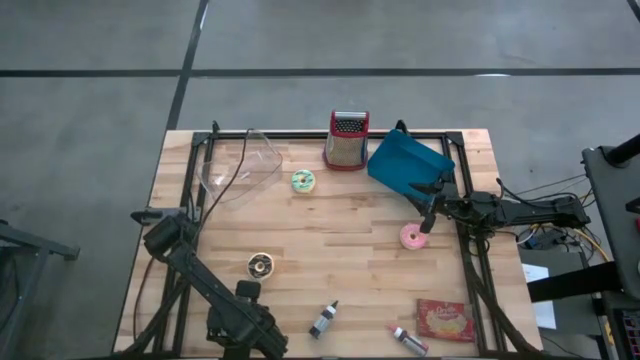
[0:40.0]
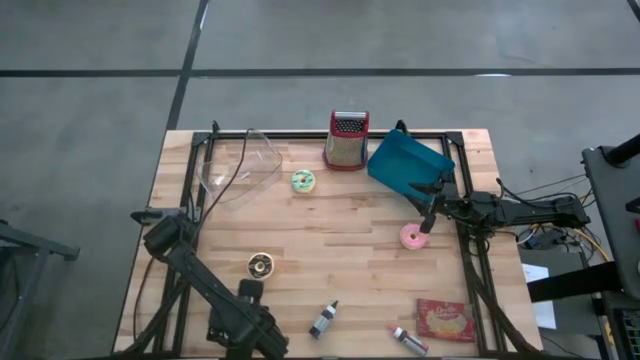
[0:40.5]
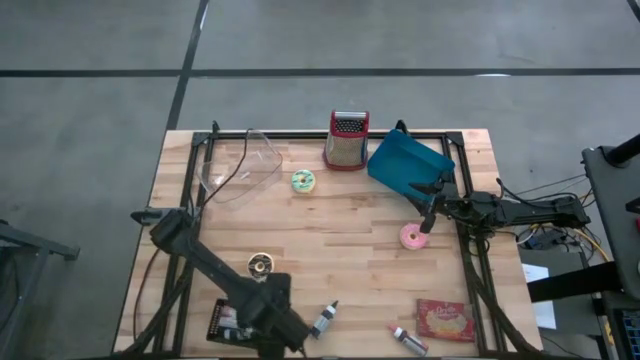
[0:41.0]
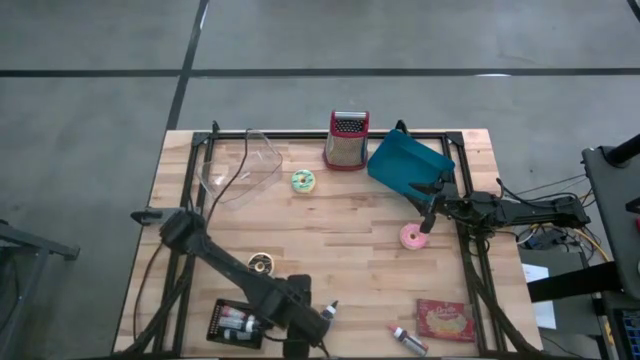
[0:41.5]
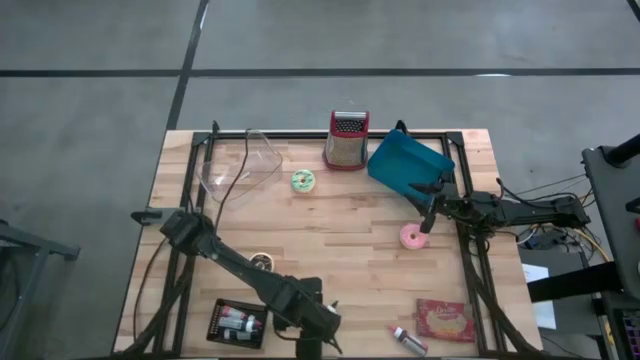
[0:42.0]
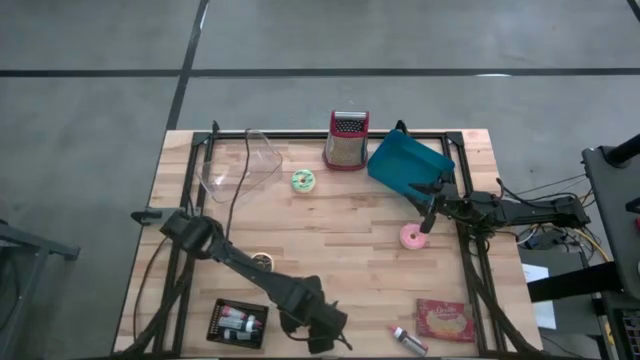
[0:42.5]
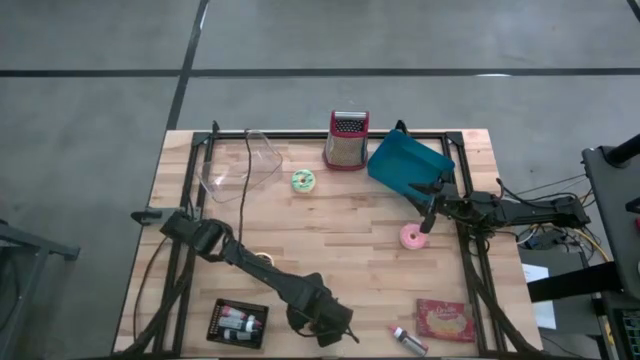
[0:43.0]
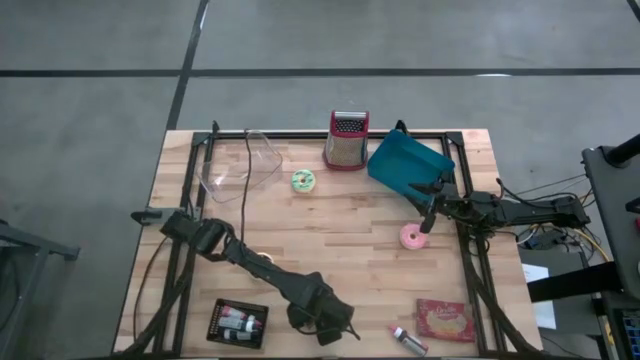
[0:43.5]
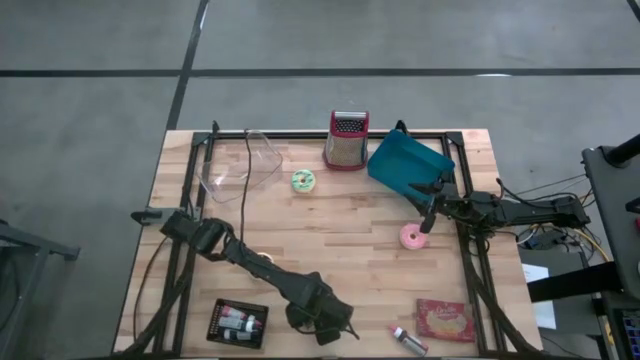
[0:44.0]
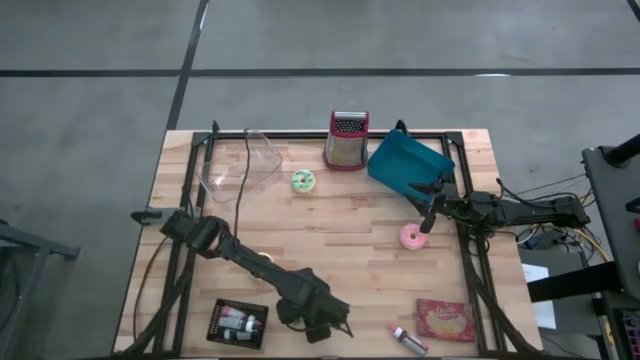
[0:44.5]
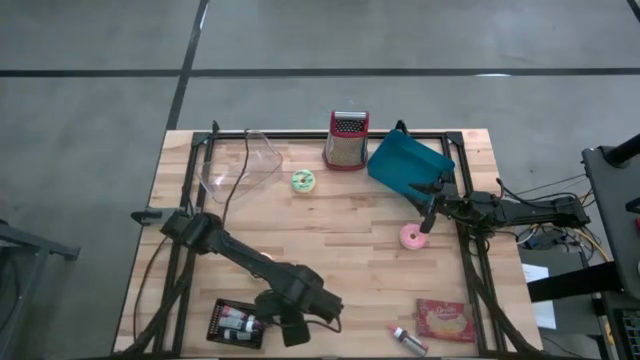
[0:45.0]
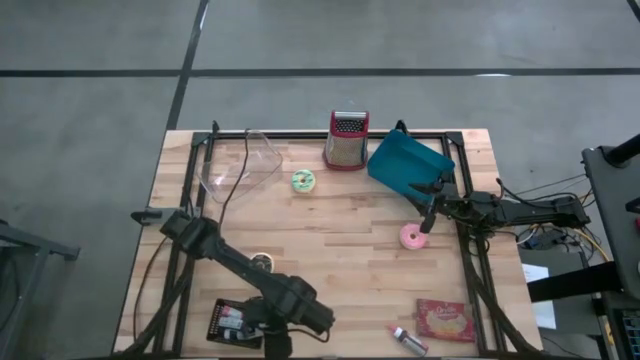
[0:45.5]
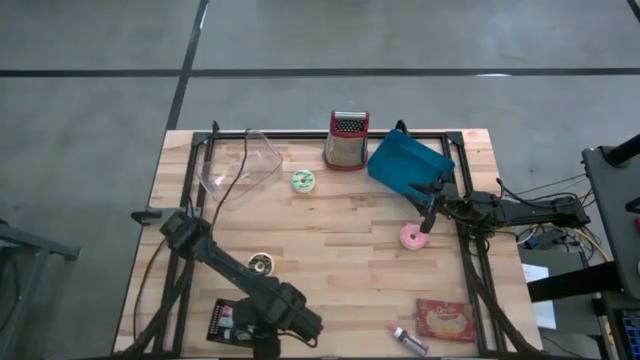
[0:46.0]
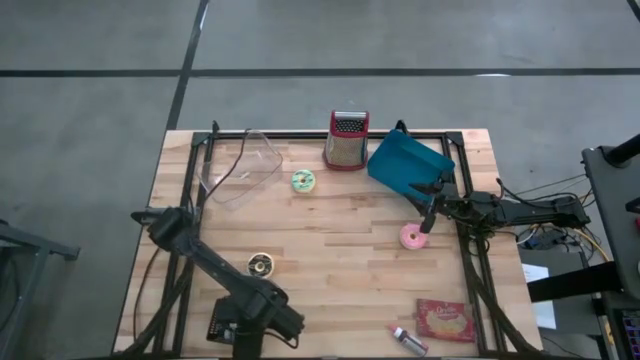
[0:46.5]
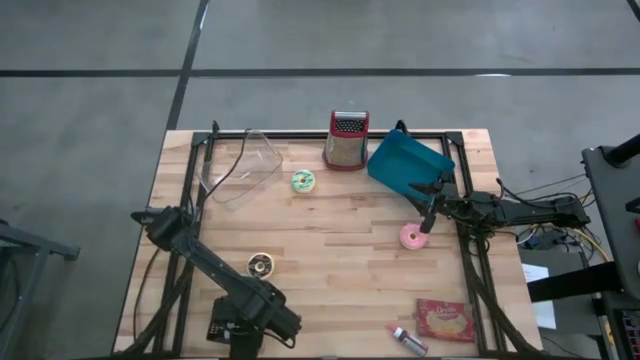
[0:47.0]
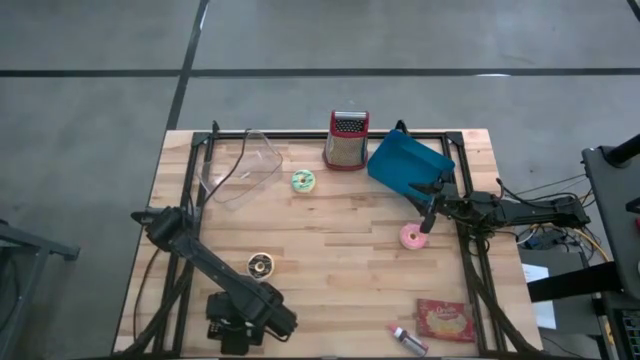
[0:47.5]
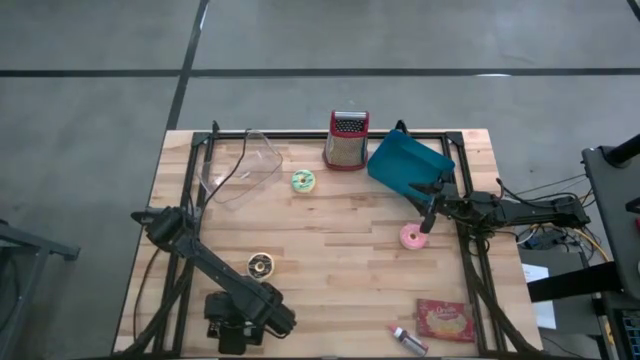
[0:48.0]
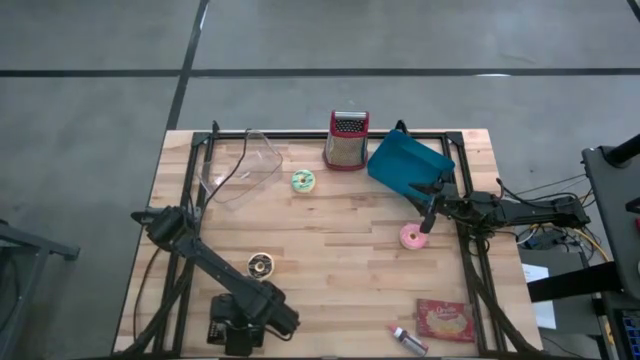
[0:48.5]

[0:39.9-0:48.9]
Task: Pick & Place Food Item
Put the black food coloring bottle into the black bin

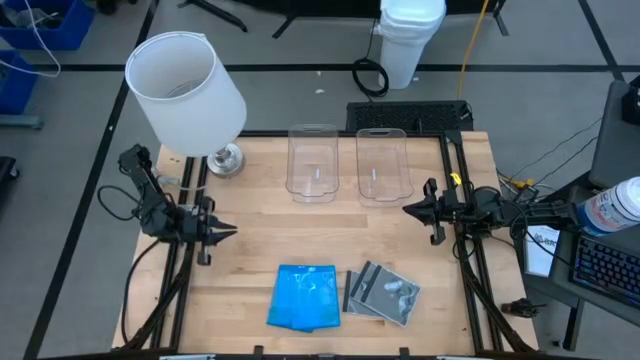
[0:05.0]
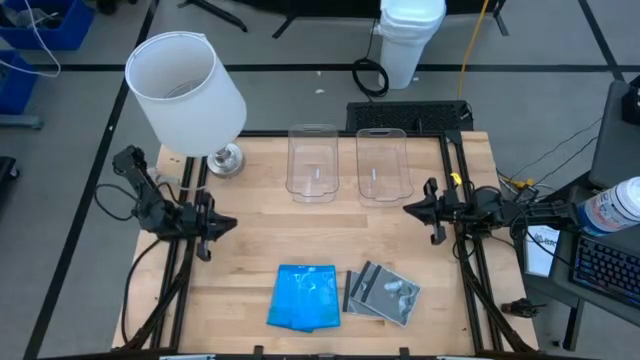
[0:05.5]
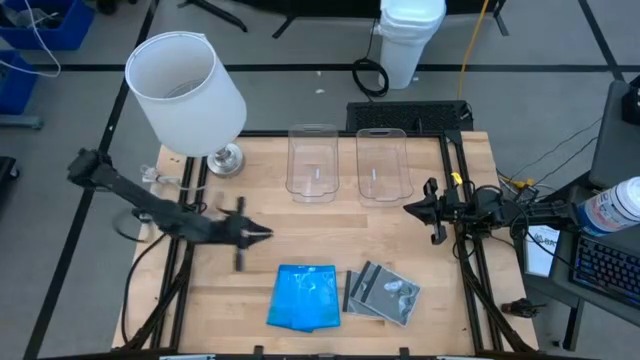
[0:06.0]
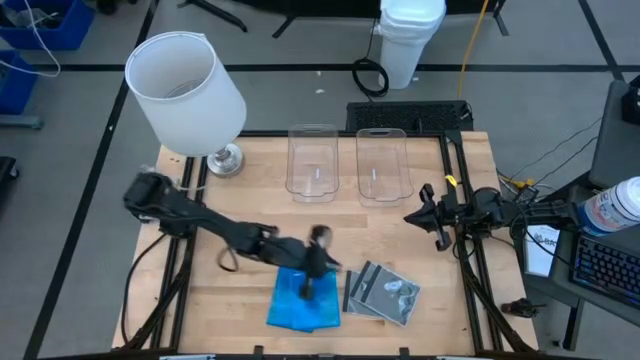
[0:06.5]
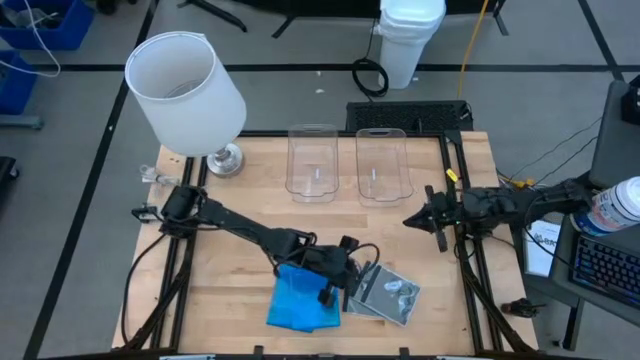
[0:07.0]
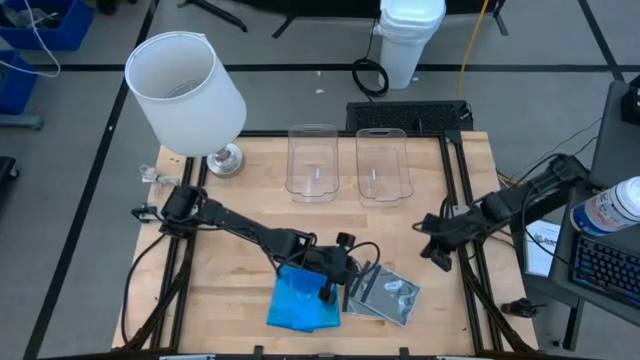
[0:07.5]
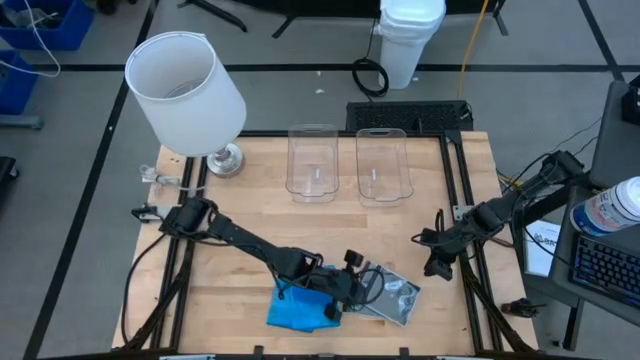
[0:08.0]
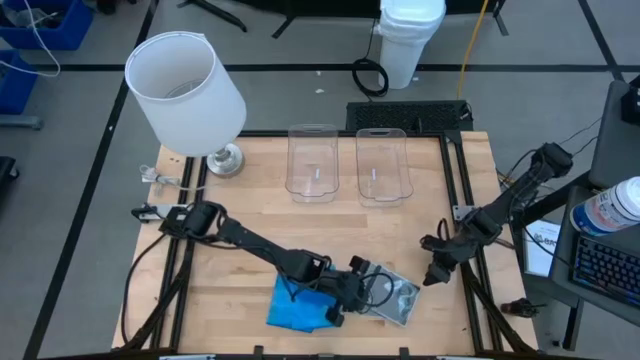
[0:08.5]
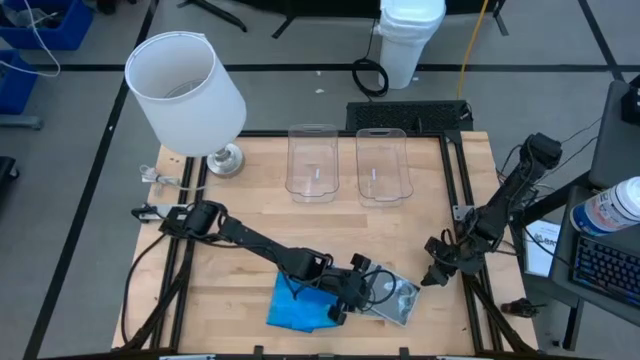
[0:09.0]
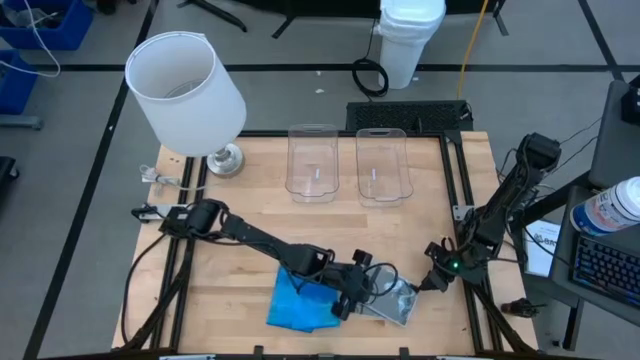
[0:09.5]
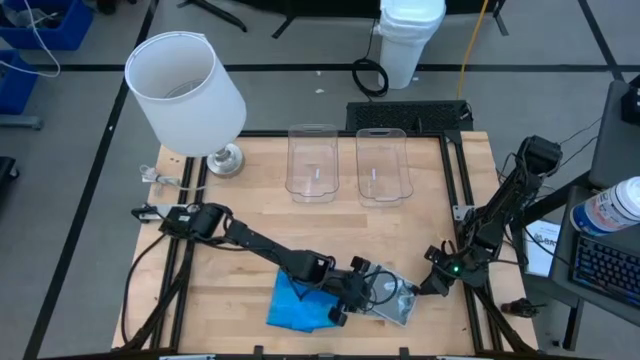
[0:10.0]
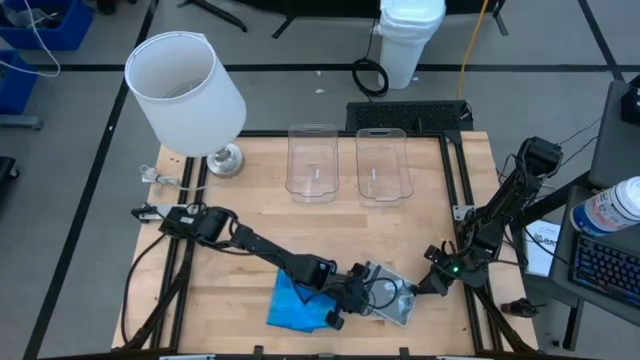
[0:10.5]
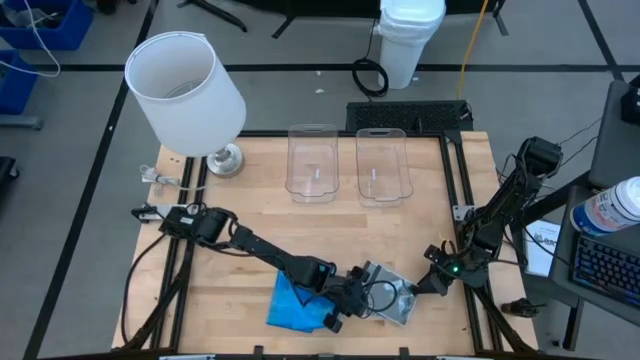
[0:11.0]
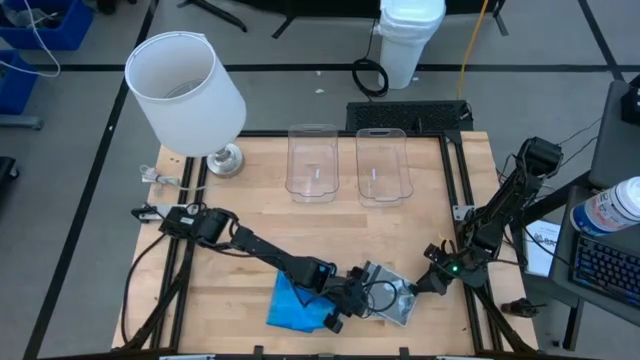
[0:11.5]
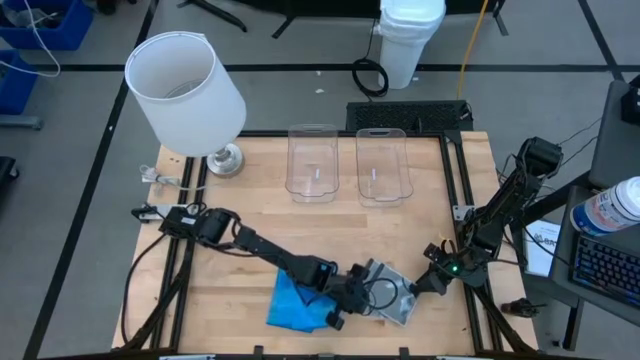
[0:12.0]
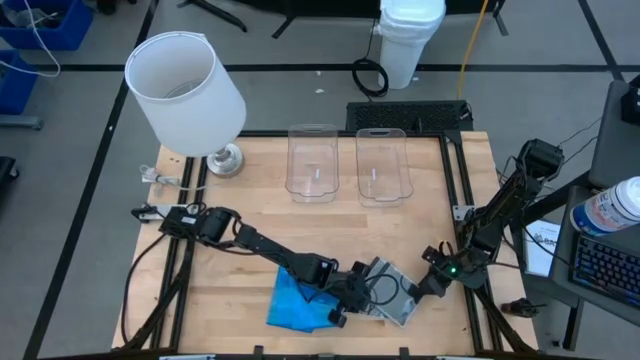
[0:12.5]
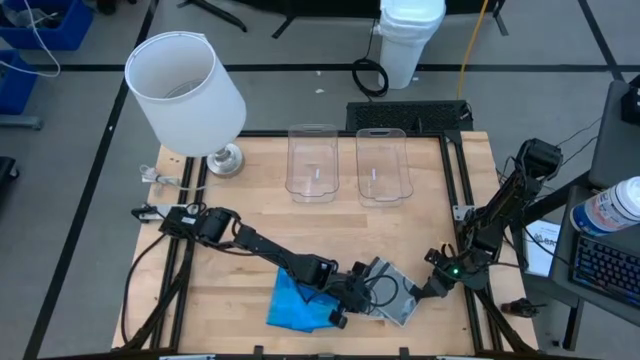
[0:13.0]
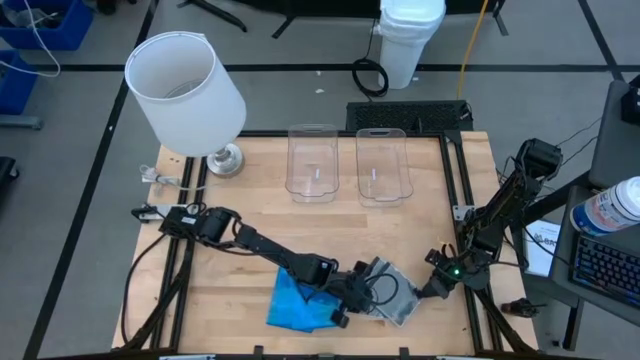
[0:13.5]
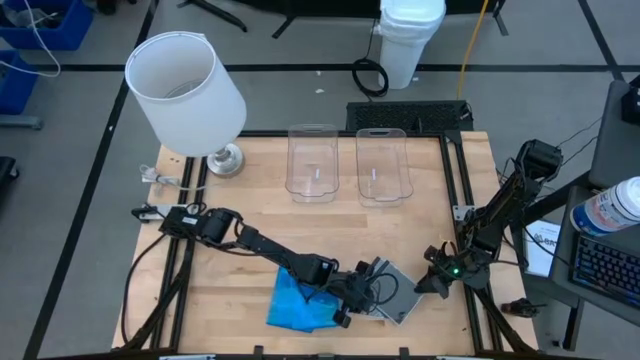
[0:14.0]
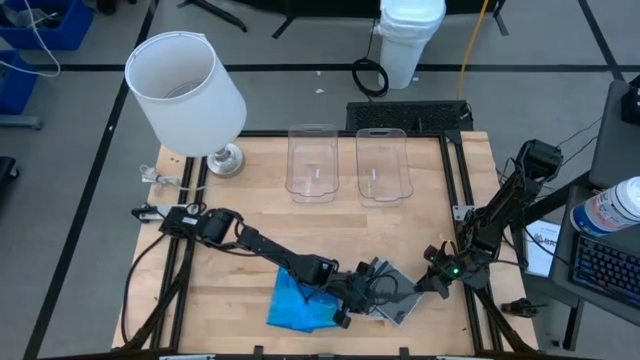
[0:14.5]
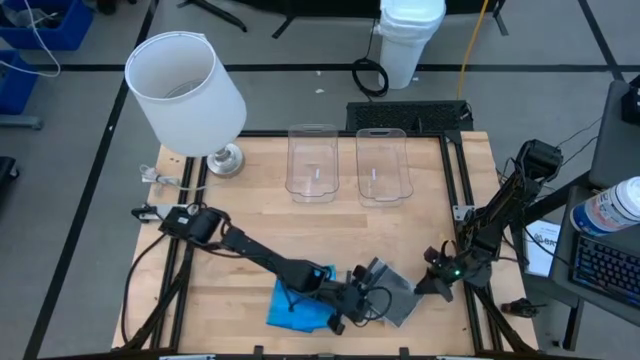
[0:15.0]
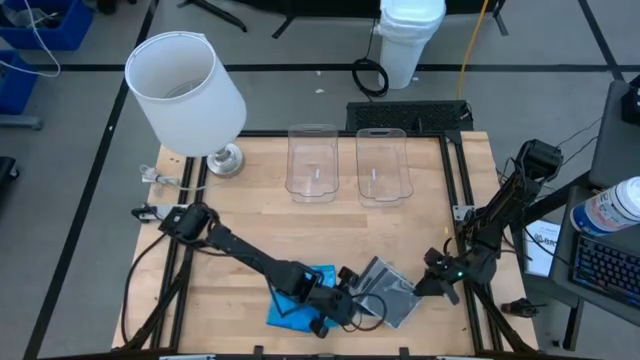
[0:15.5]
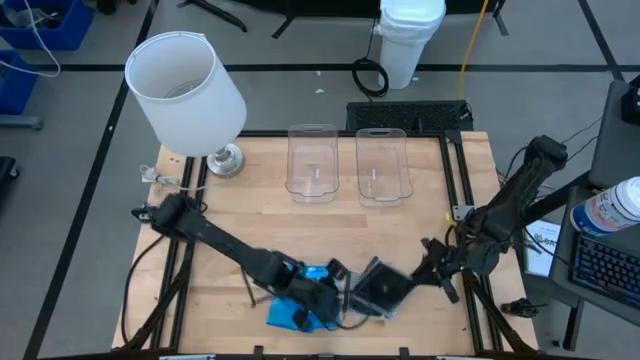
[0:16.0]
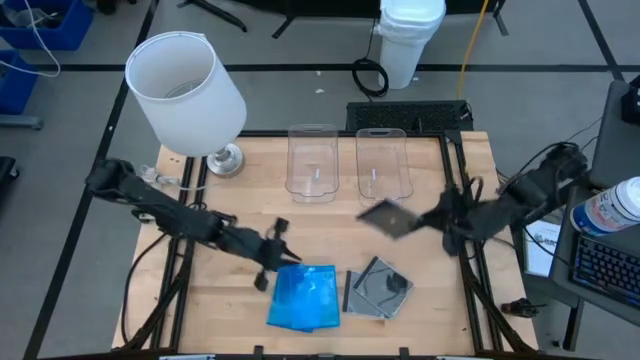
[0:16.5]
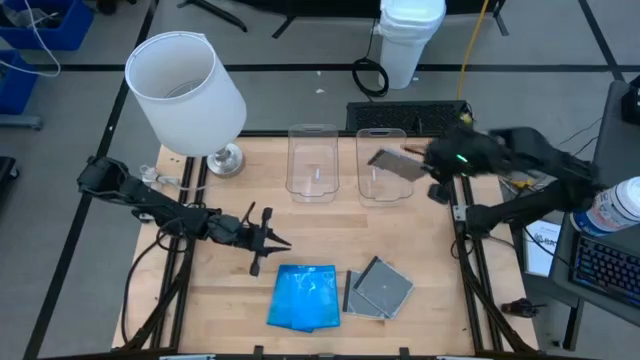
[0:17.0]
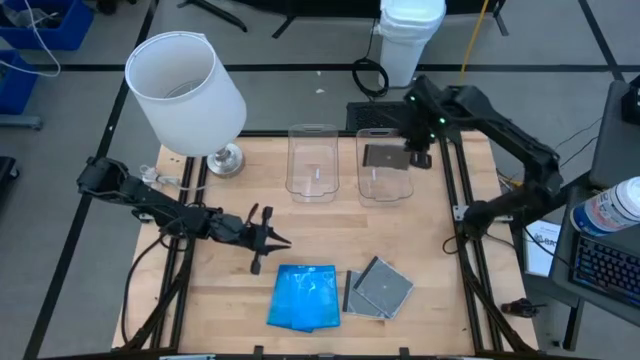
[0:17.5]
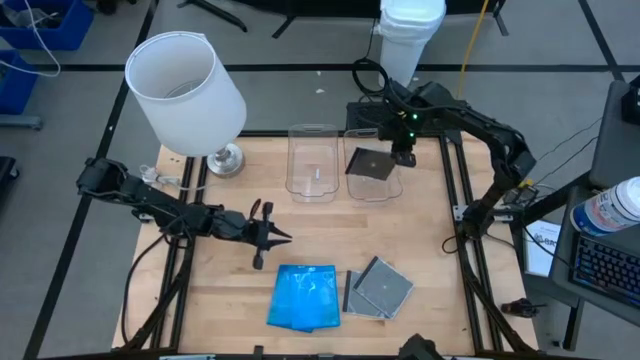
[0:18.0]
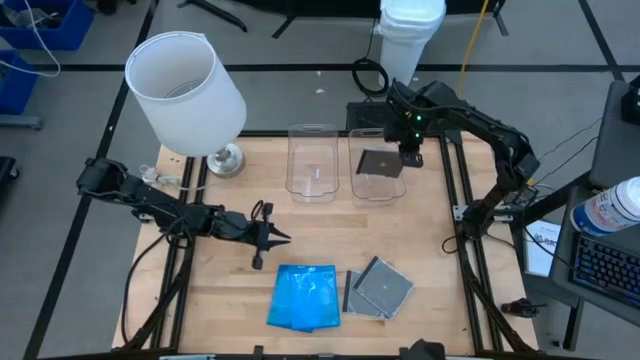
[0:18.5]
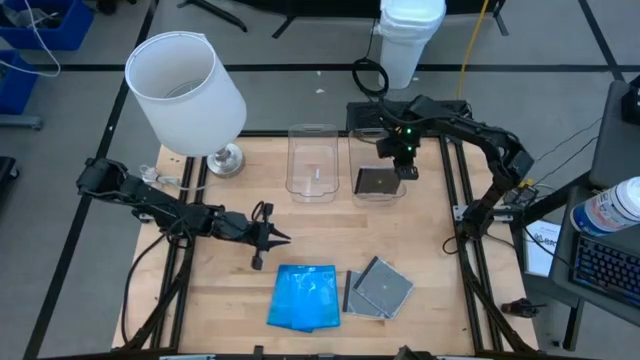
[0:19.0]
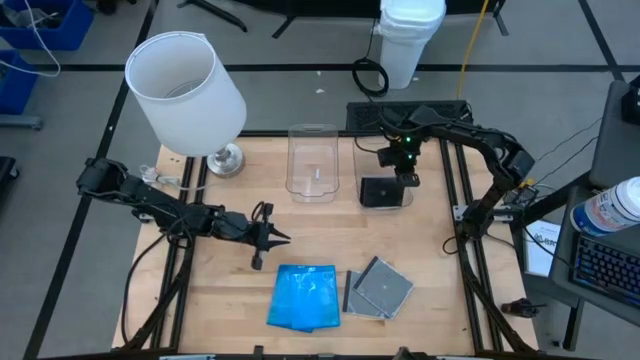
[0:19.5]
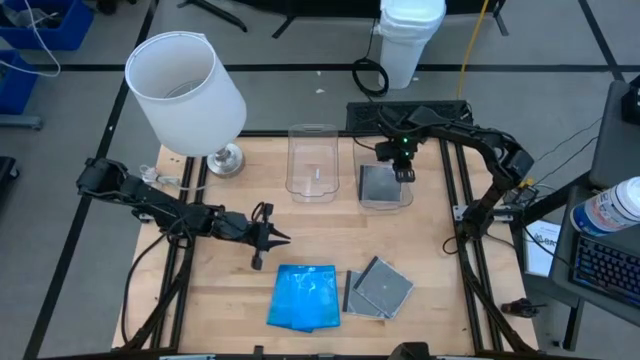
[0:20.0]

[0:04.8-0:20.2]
Task: Pick & place jewel cases by type
Put the right black CD case into the right transparent bin
